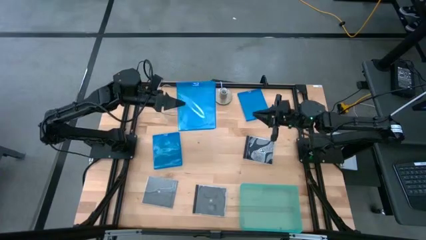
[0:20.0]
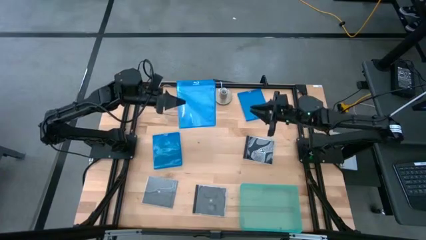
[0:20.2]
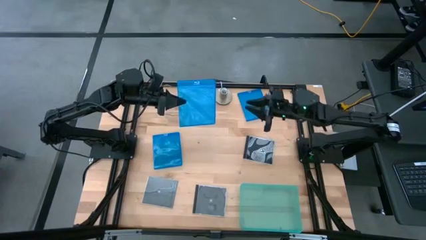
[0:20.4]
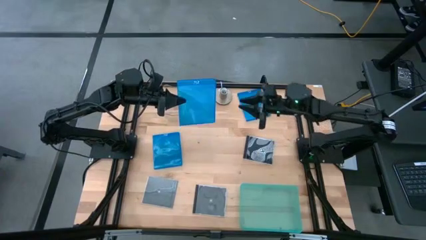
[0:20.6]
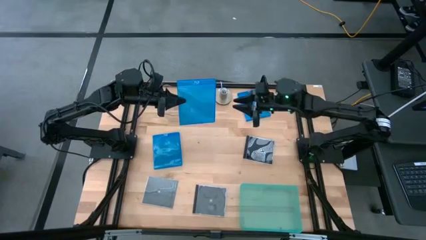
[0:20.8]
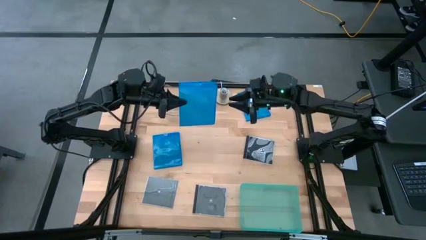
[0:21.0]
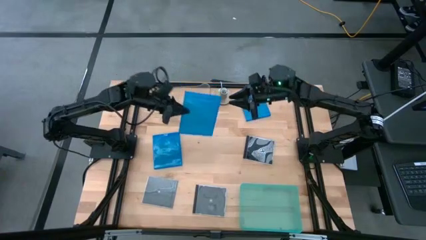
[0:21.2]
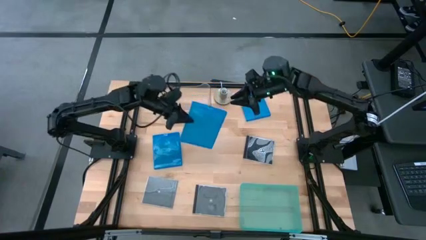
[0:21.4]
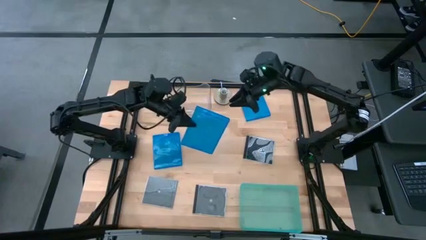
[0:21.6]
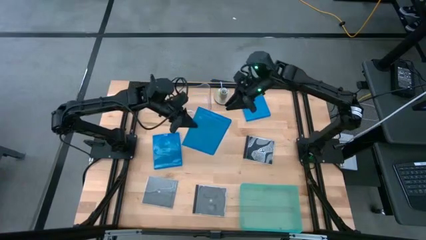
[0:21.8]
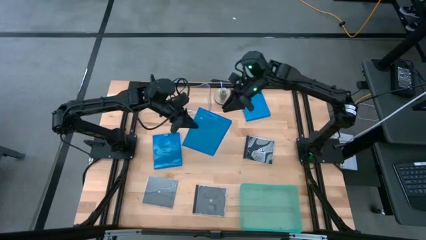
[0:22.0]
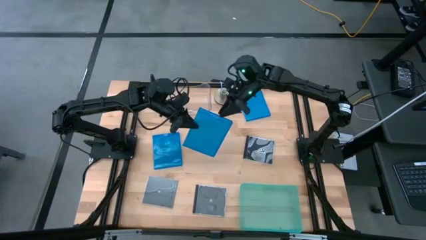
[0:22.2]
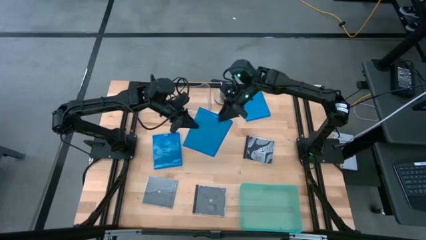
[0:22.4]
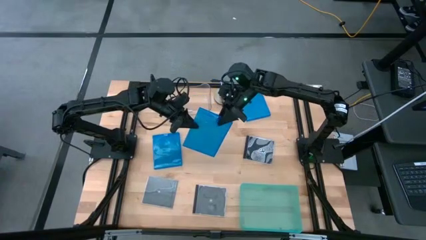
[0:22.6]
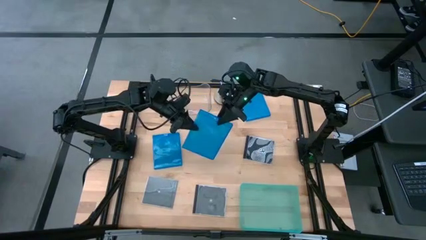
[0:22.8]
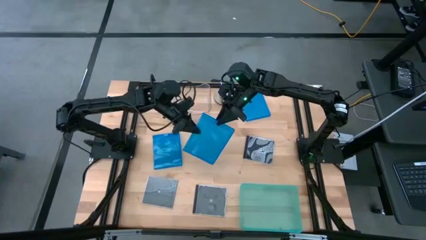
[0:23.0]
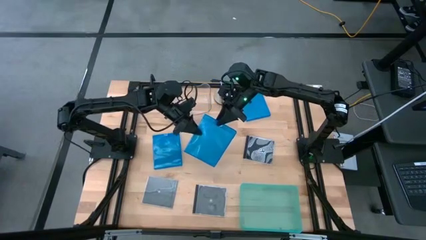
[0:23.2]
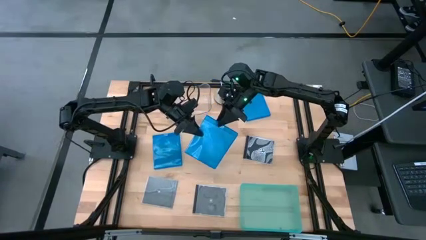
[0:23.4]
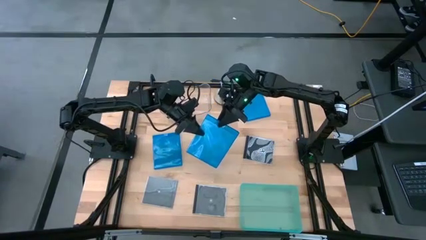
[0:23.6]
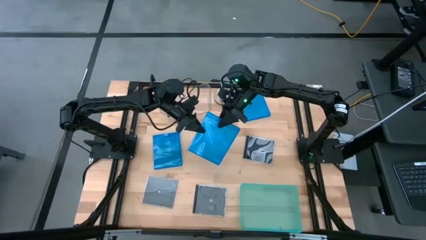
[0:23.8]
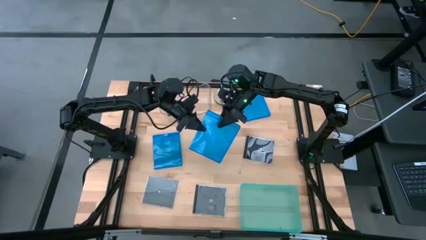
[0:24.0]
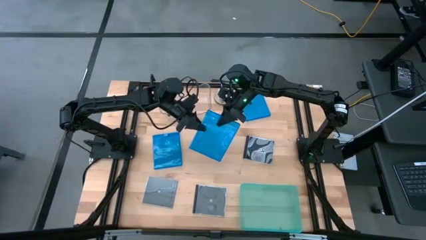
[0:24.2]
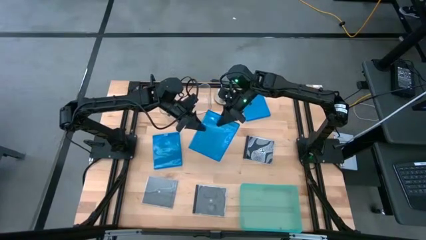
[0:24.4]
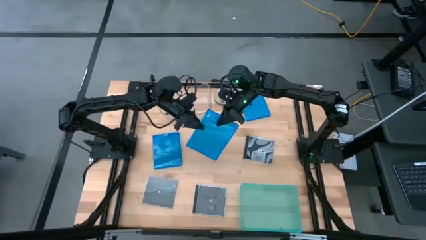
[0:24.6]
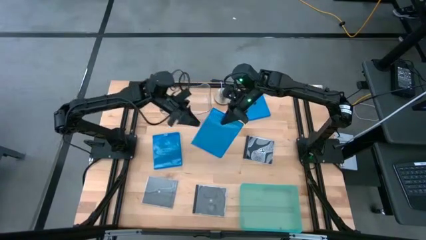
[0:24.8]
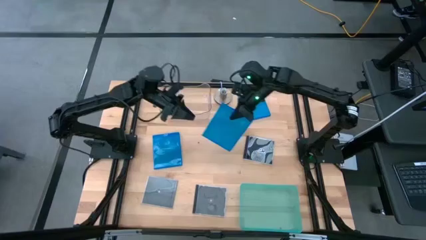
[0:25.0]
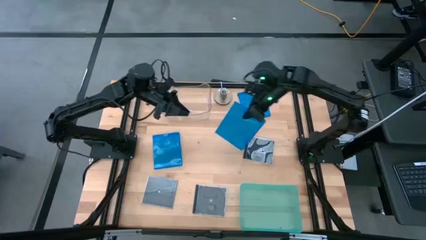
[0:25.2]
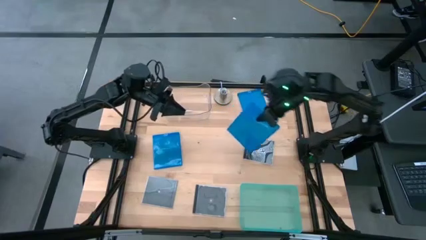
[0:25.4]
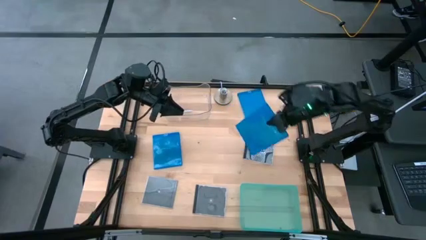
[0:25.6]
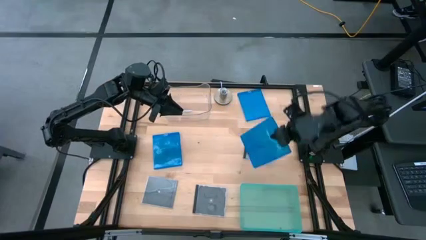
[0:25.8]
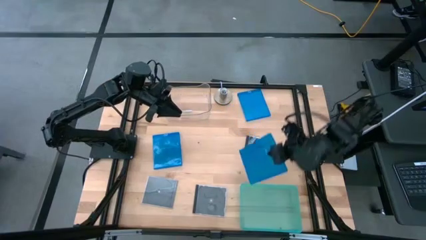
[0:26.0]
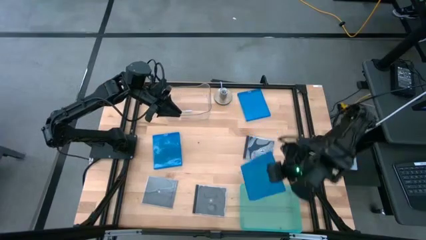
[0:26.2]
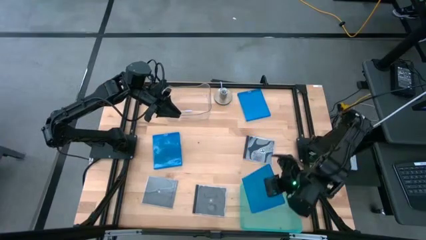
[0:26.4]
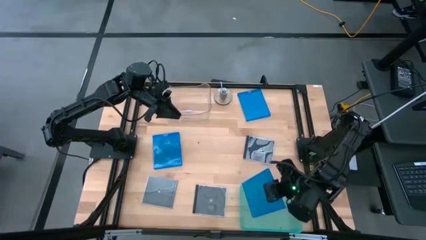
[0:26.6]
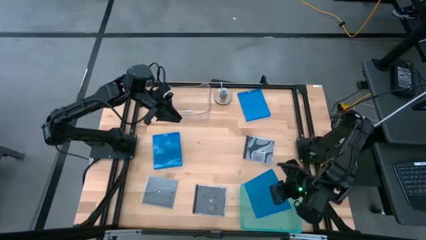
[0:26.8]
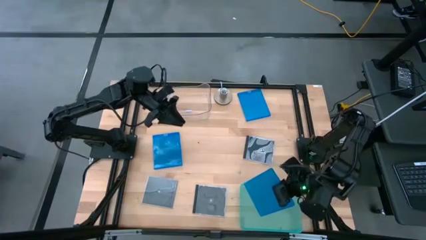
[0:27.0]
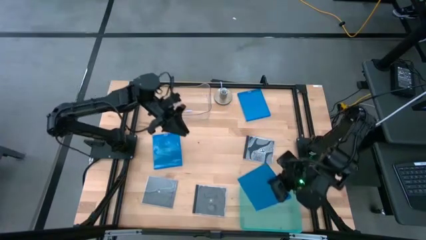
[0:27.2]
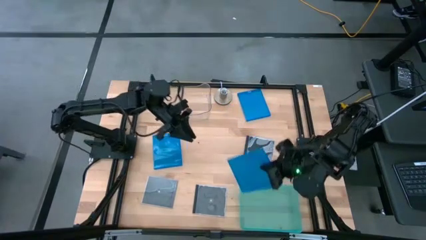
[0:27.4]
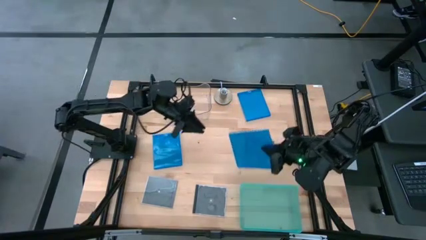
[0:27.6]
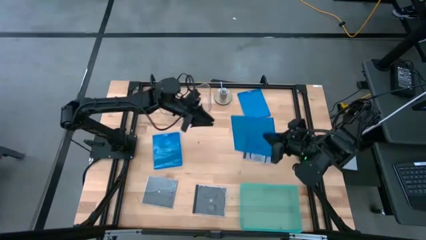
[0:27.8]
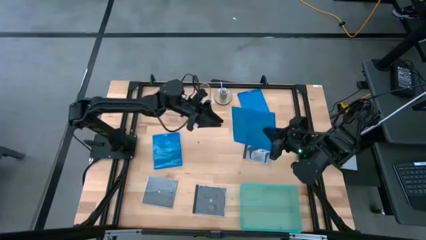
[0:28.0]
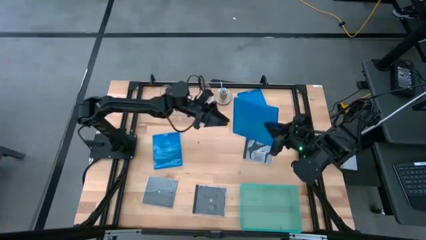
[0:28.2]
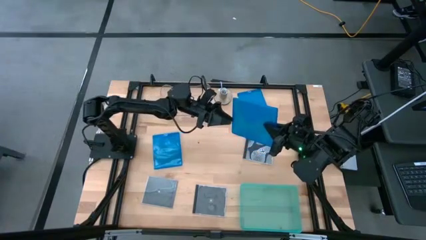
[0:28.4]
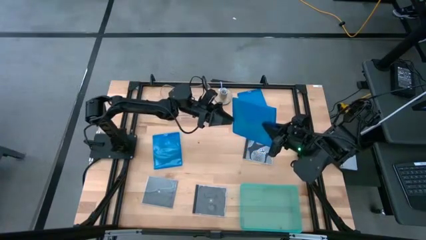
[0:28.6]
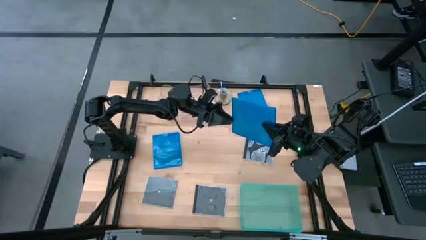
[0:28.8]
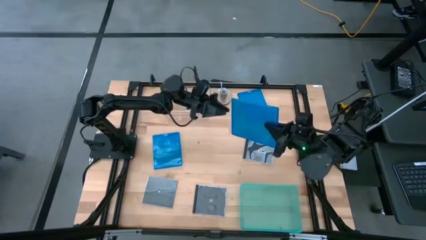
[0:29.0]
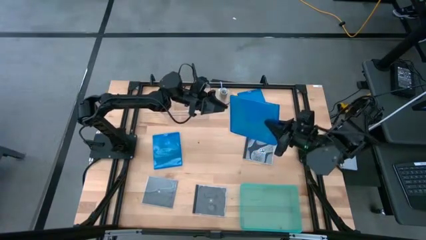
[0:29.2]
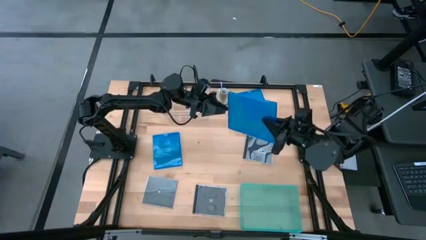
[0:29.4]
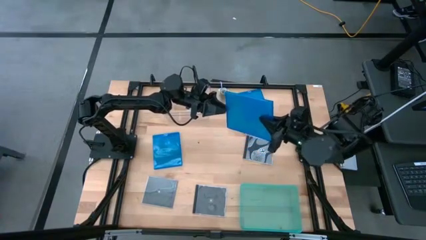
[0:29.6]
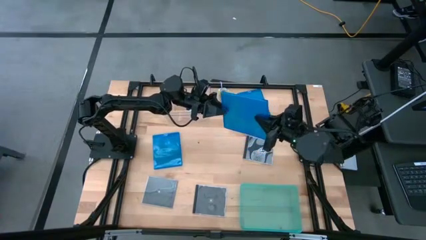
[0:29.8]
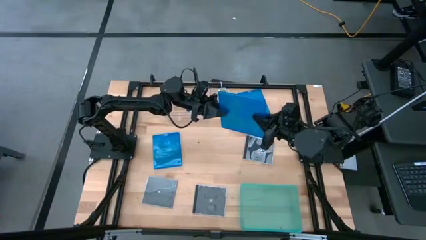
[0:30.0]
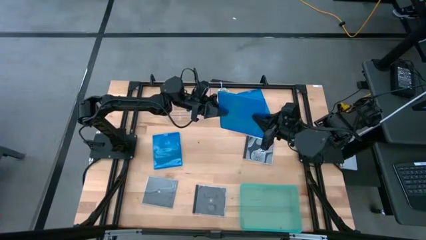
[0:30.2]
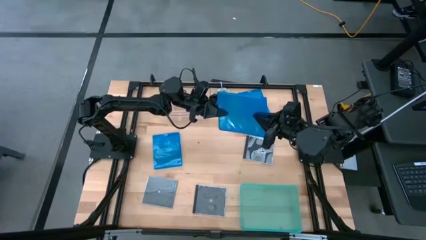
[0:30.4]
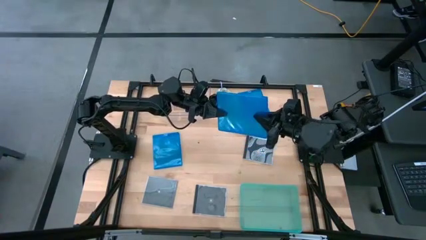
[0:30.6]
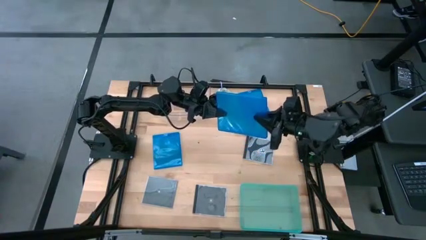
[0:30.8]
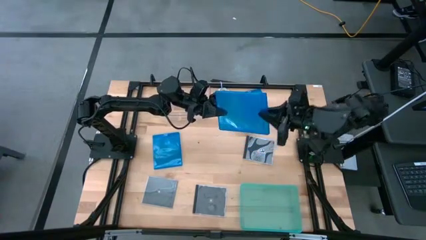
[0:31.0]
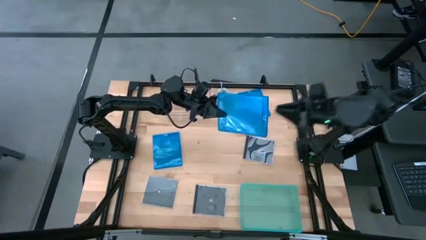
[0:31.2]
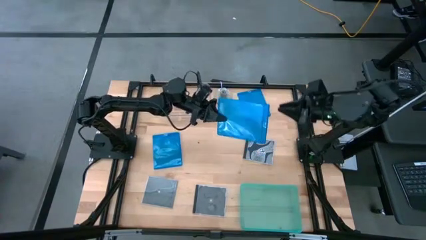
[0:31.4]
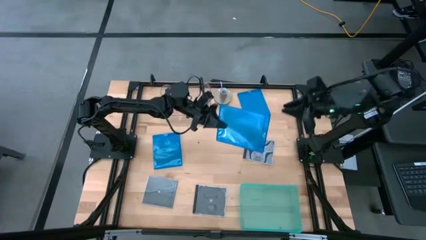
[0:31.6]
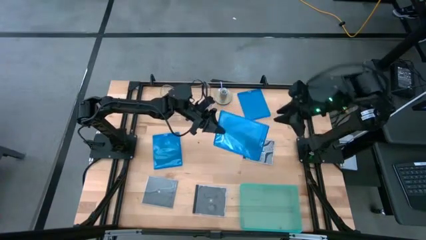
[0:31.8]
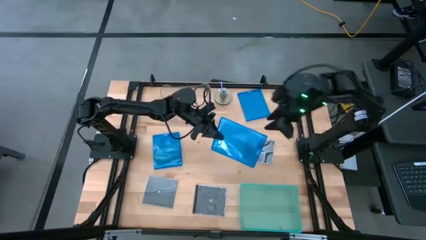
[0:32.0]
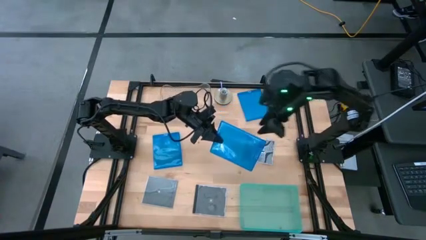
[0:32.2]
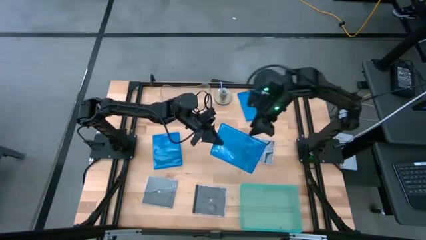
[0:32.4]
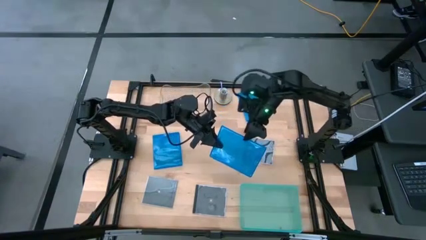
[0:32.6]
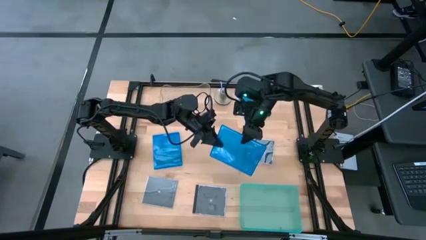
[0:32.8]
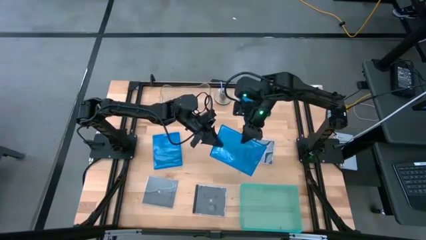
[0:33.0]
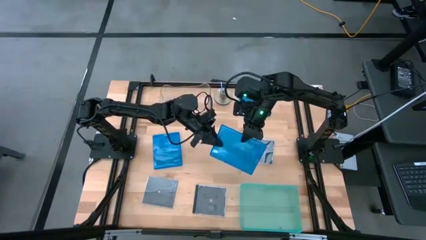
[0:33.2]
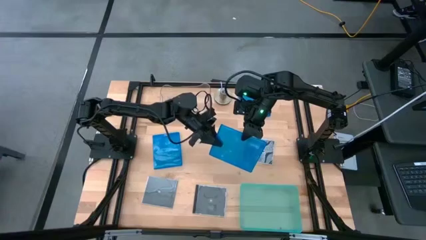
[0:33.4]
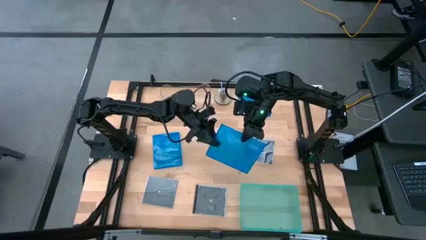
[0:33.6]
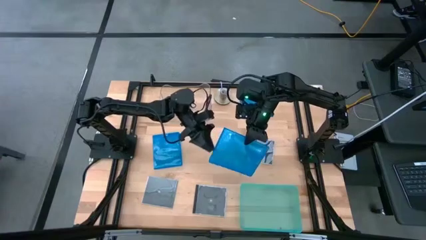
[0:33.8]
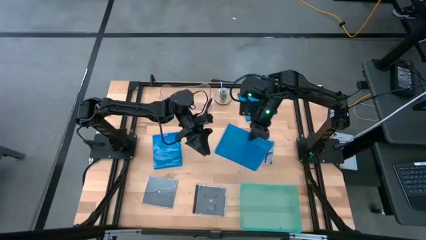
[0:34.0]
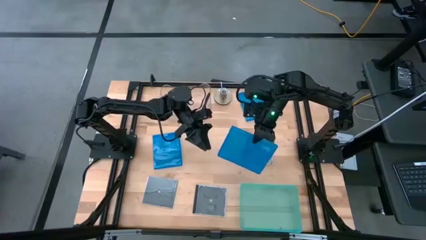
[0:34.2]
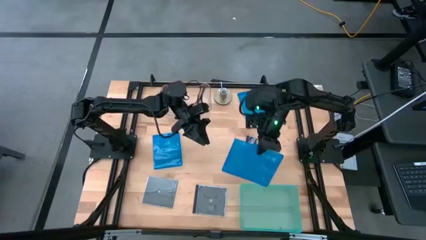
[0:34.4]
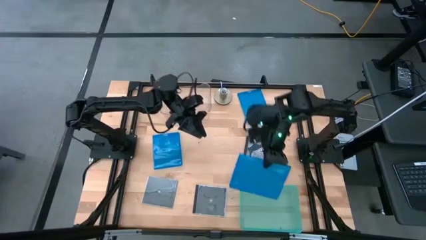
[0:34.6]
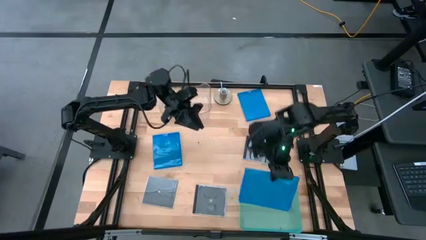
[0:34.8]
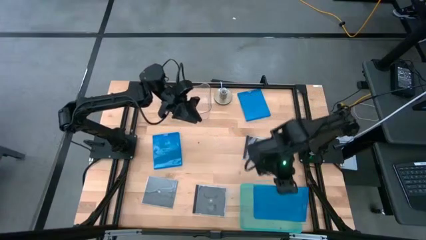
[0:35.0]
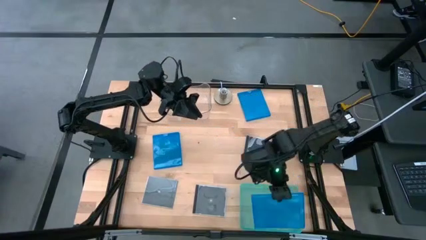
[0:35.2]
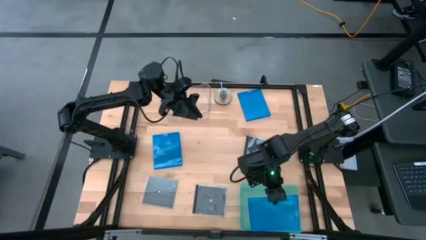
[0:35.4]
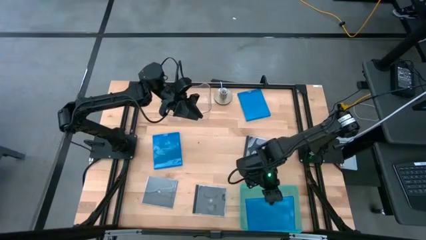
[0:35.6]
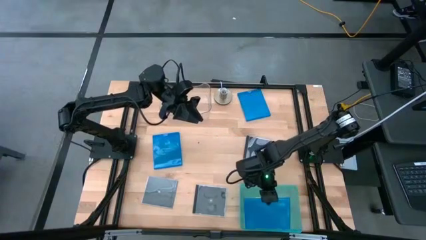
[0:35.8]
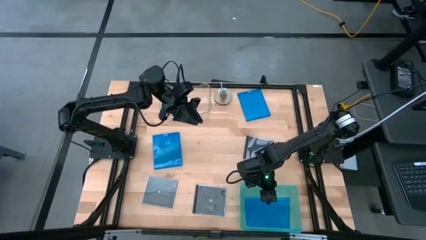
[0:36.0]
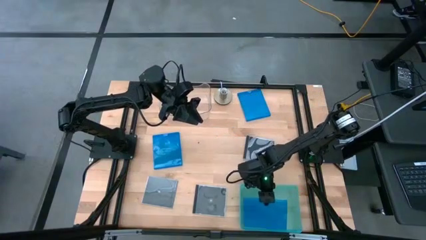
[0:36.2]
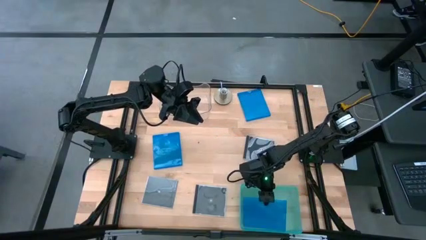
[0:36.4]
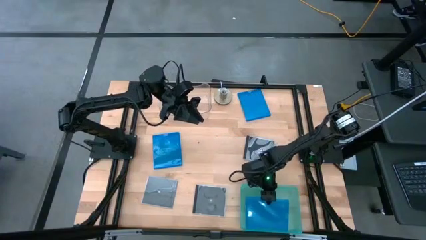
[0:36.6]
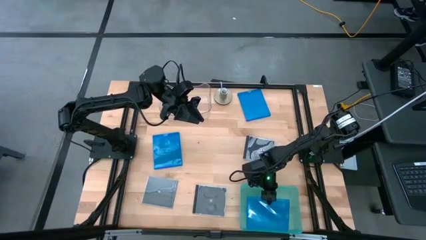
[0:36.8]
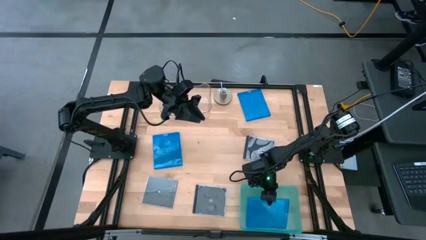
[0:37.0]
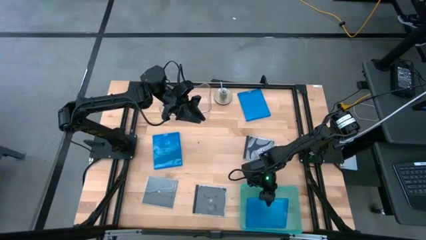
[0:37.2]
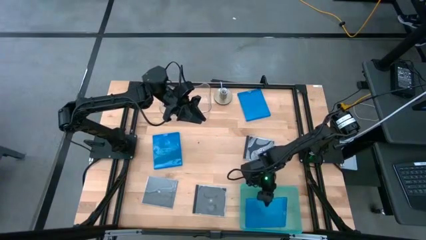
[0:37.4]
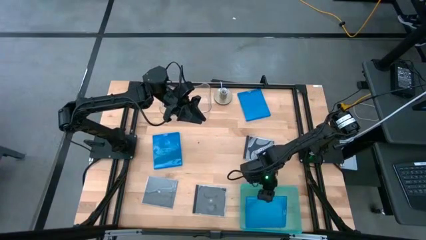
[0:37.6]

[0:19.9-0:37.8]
Task: Pick & place jewel cases by type
Put the bottom right blue cd case into the green bin
